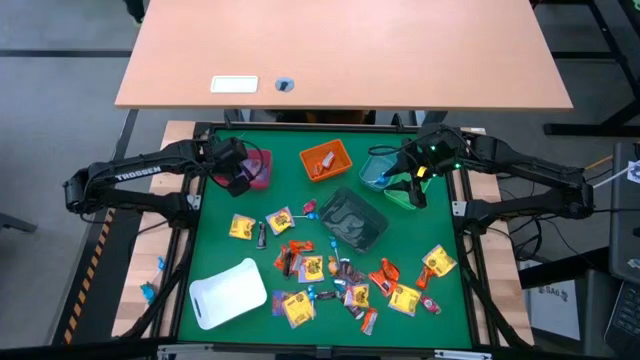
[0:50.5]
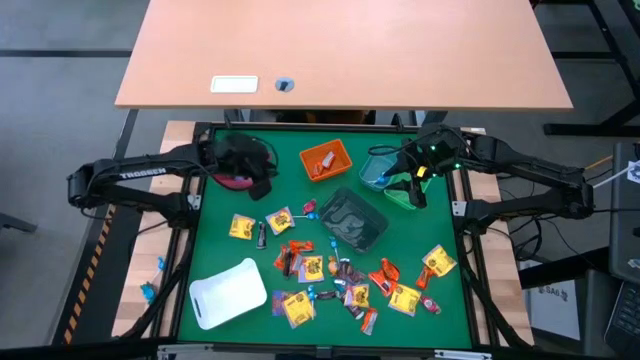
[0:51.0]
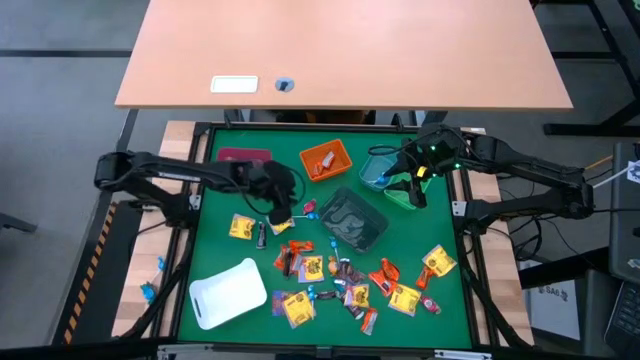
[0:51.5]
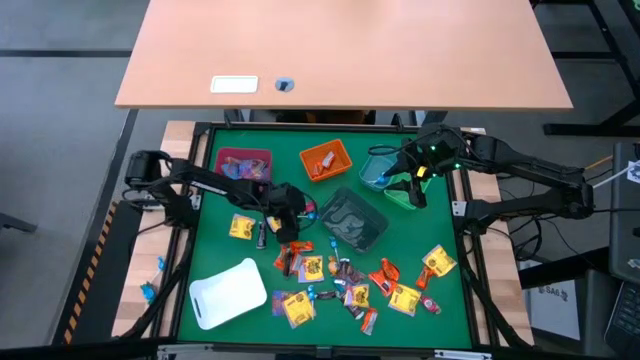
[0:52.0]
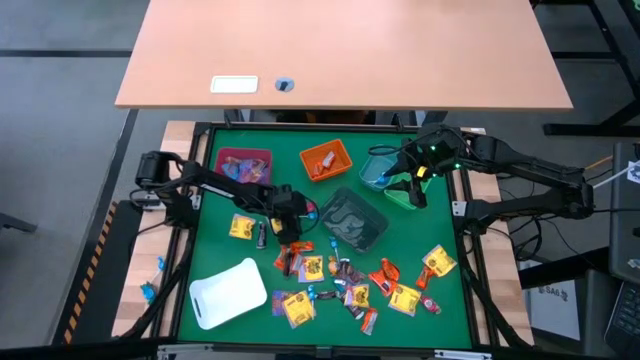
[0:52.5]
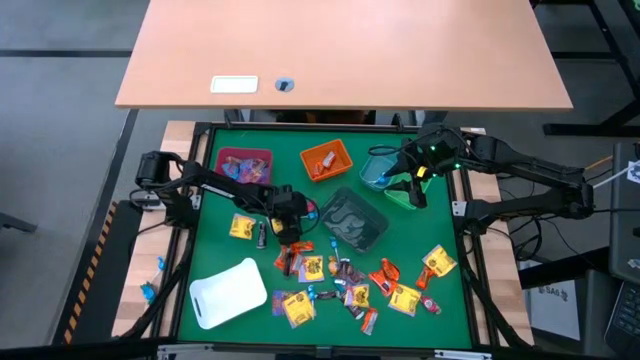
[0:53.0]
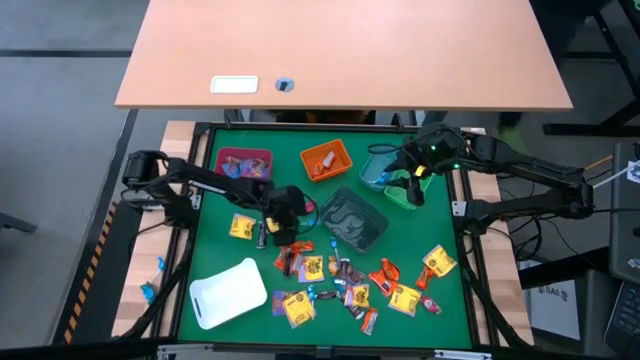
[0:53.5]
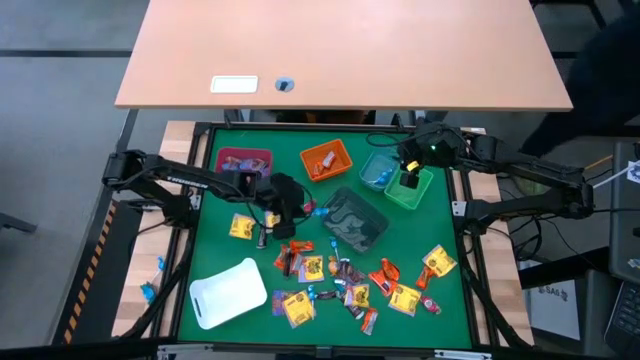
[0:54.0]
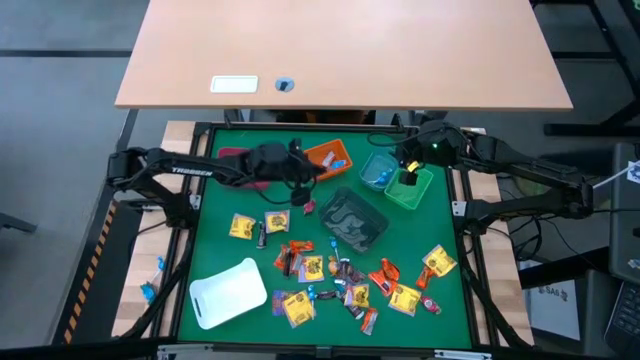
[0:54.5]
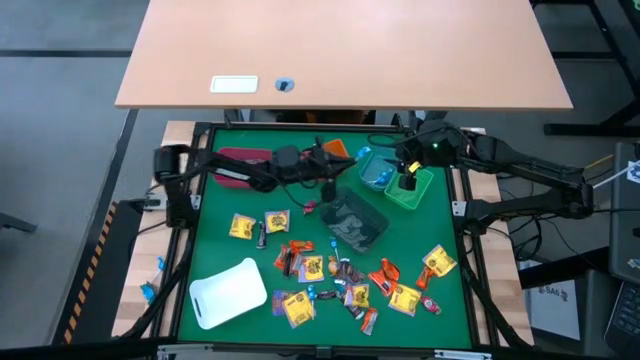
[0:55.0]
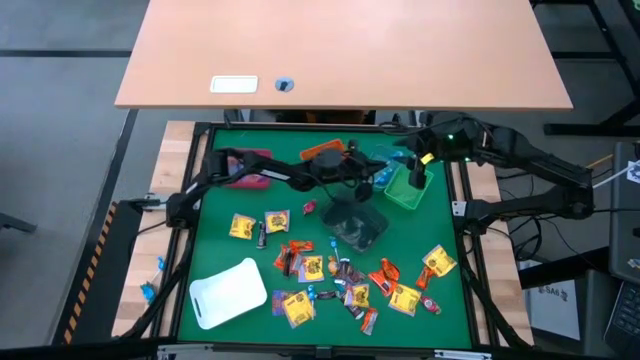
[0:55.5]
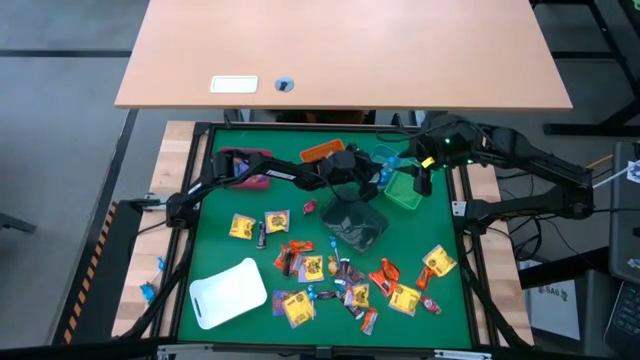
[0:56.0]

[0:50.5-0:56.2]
Task: Sort candy
Put the blue lollipop into the blue bin

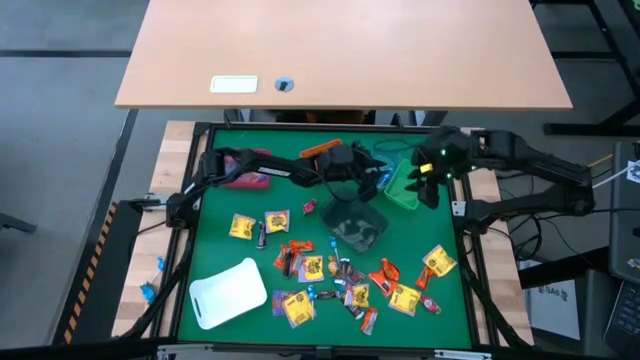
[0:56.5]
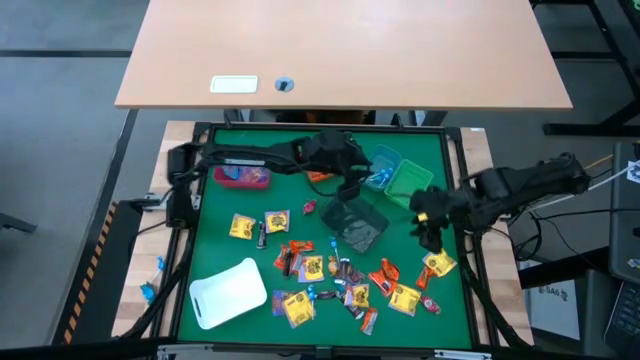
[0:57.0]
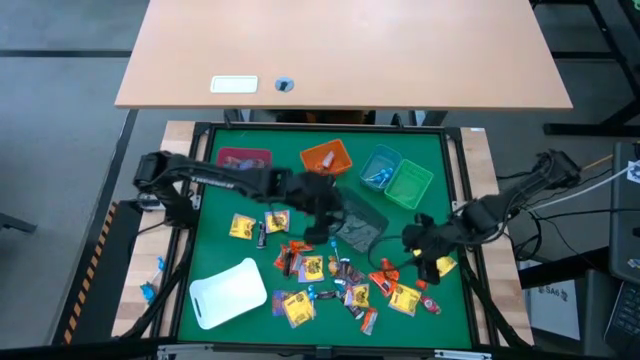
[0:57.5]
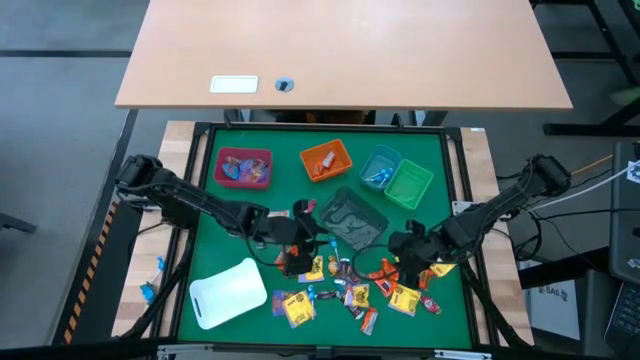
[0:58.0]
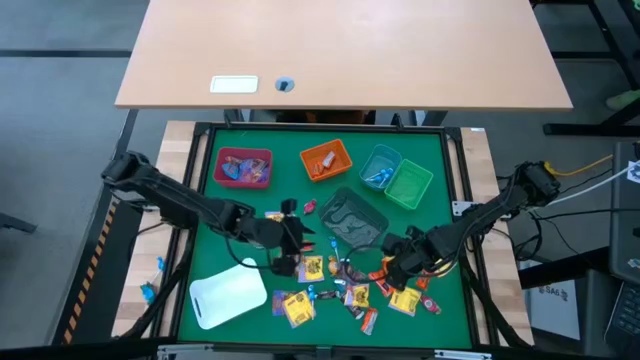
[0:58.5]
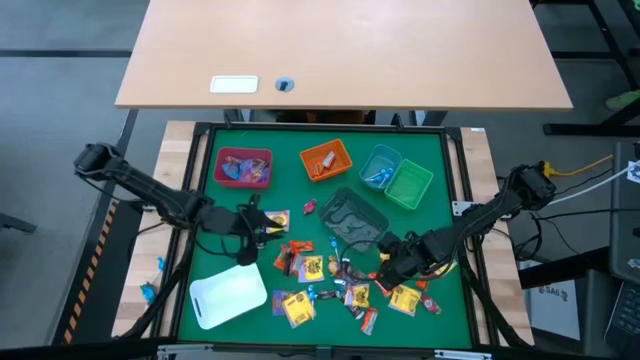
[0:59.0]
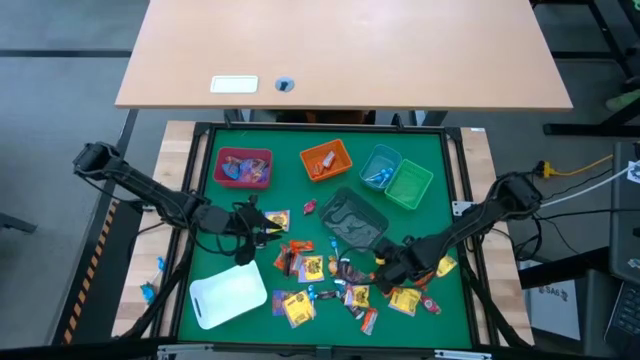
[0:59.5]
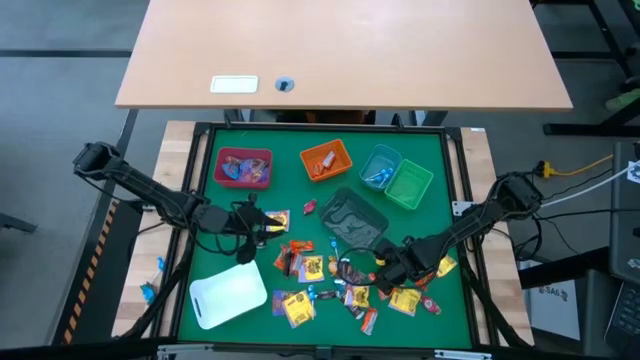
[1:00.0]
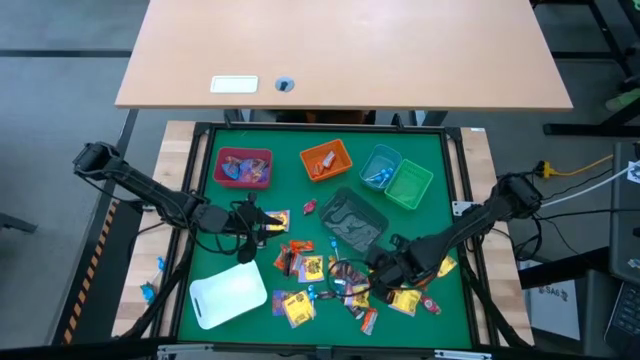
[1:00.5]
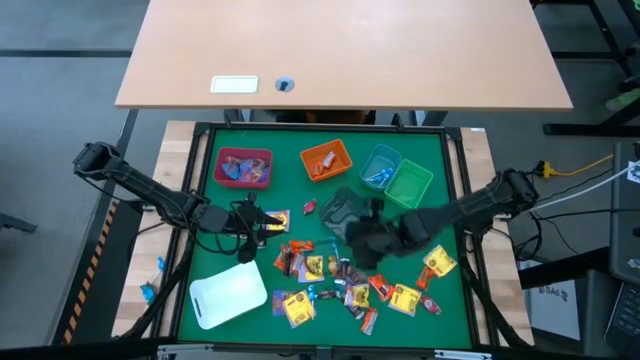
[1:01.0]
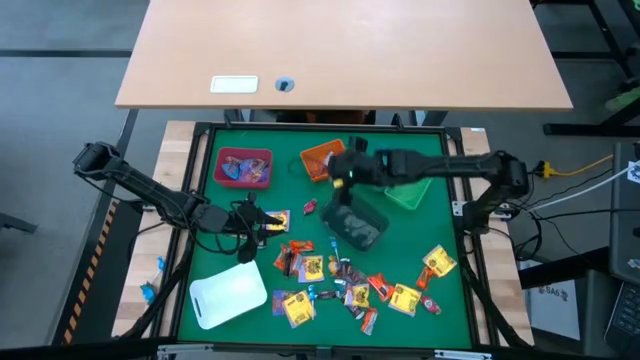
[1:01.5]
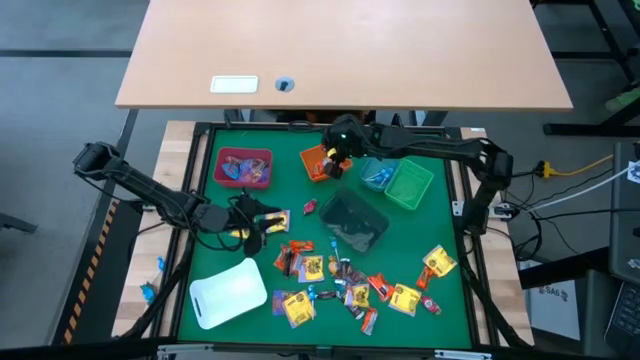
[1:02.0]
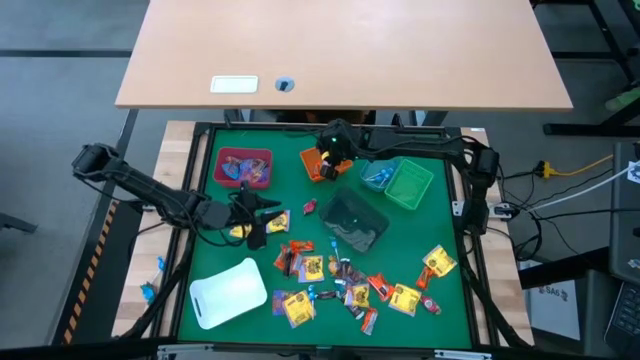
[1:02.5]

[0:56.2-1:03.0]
Put the orange chocolate into the orange bin

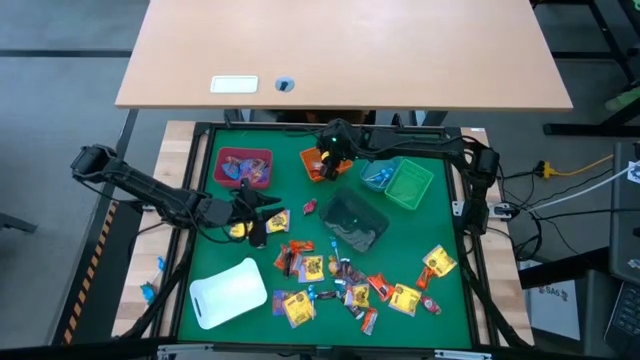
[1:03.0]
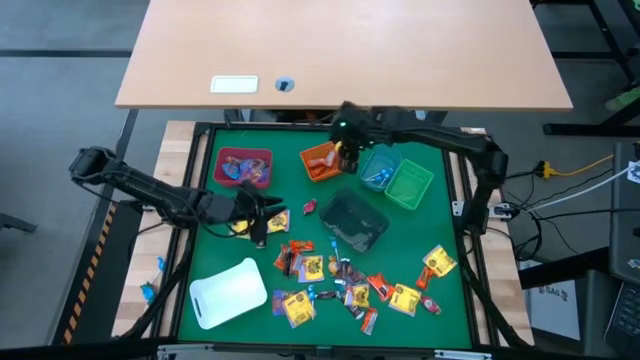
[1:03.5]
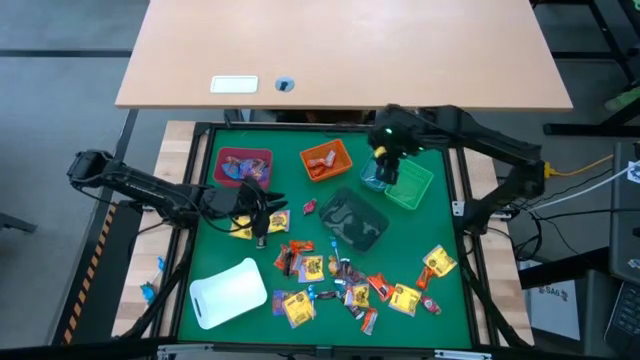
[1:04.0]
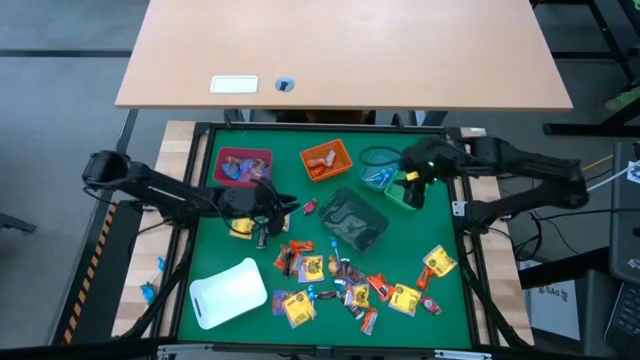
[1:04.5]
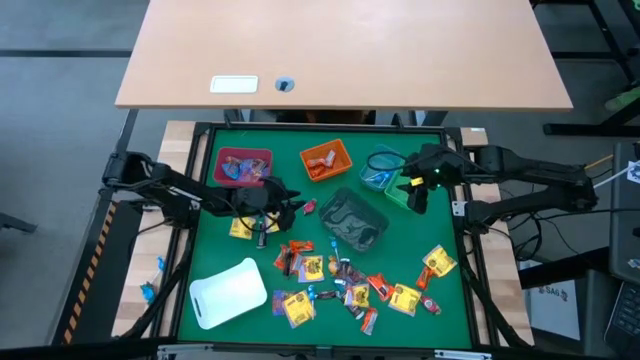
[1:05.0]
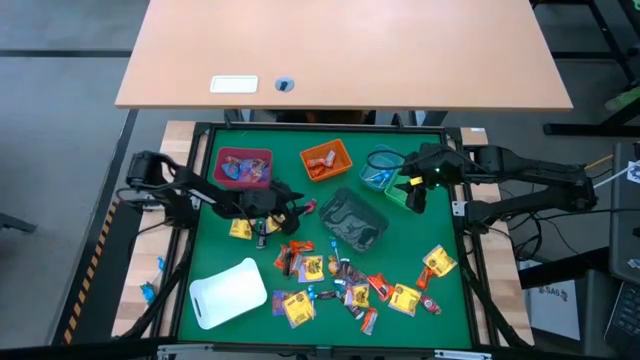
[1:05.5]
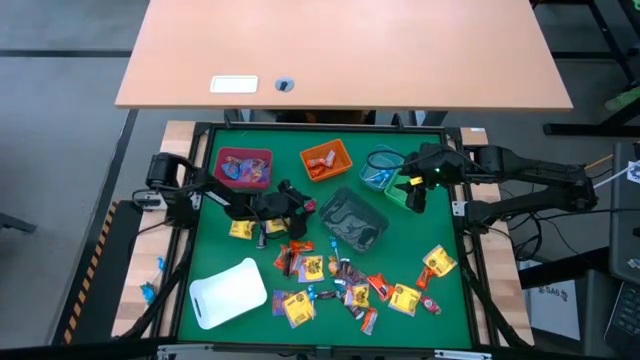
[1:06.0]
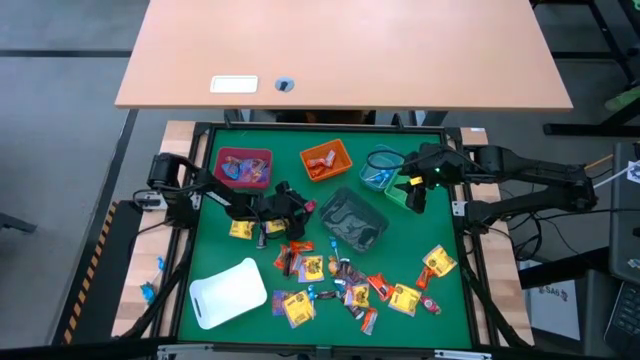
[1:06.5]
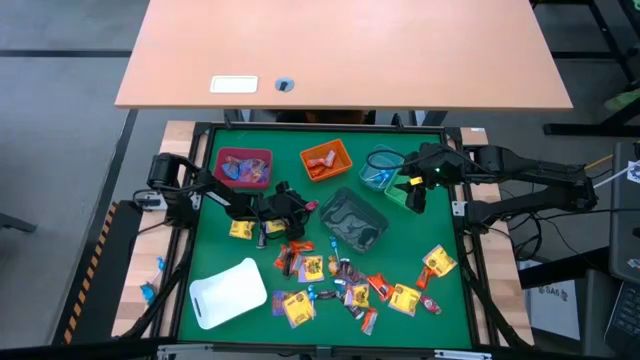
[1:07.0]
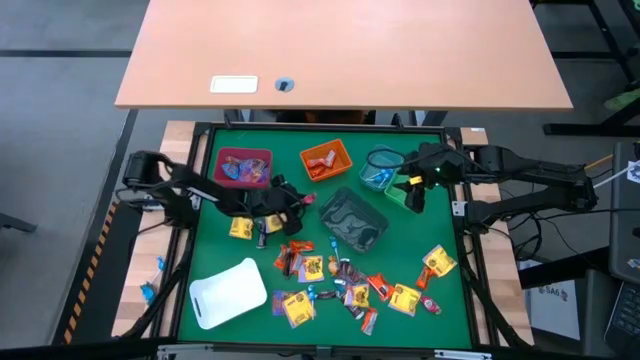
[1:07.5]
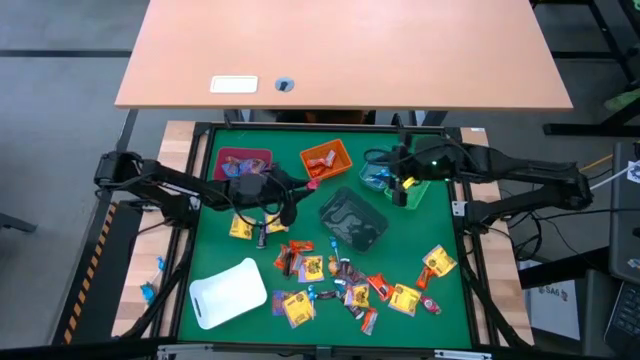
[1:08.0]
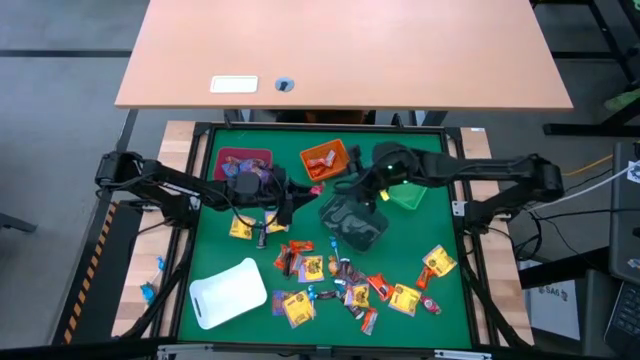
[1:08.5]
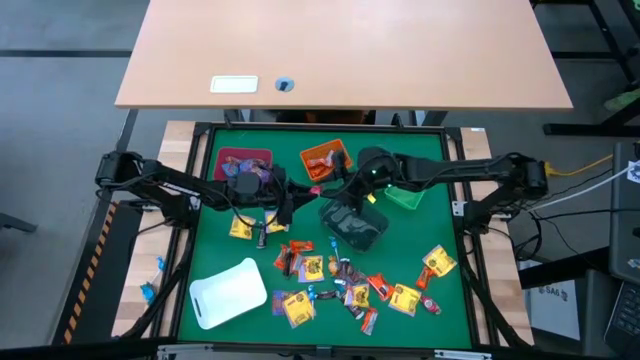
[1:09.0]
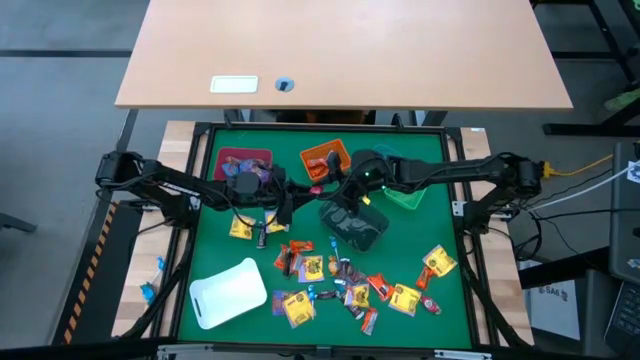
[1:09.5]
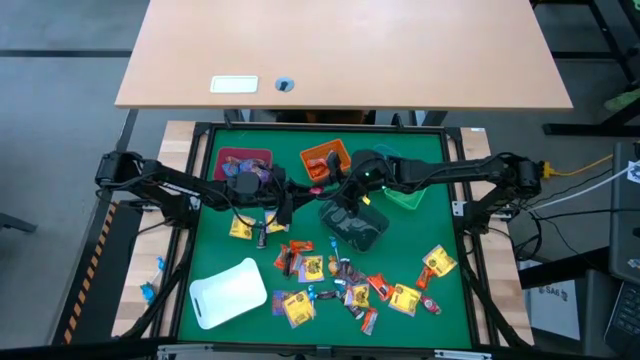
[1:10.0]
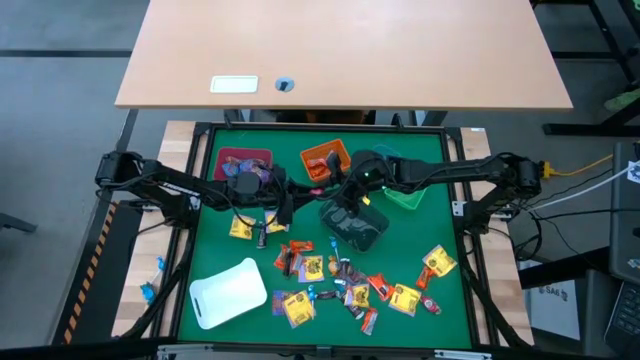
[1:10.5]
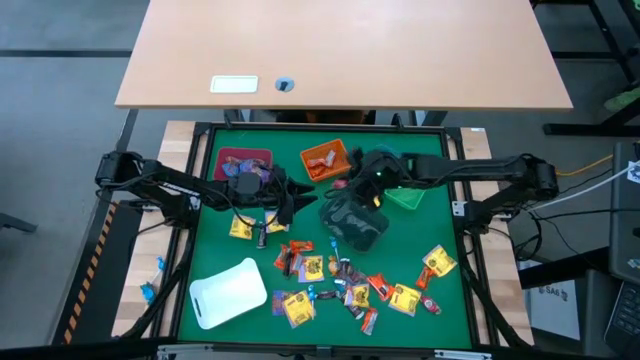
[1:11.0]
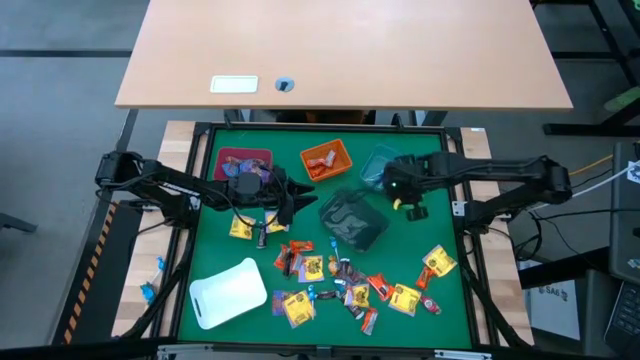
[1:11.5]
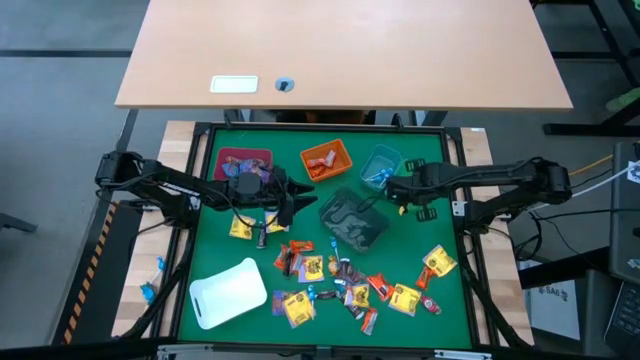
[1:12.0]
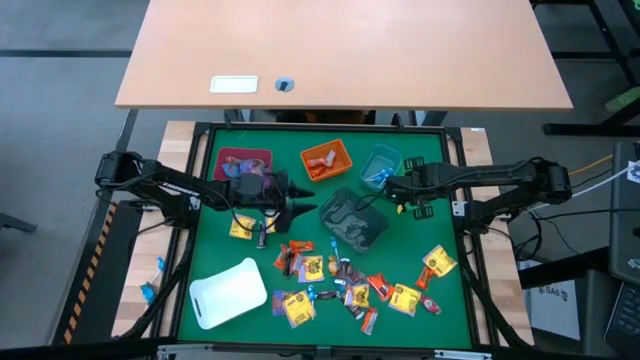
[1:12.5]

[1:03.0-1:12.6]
Put the red chocolate into the green bin
